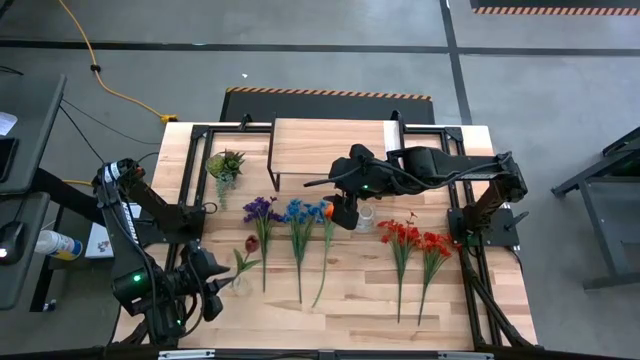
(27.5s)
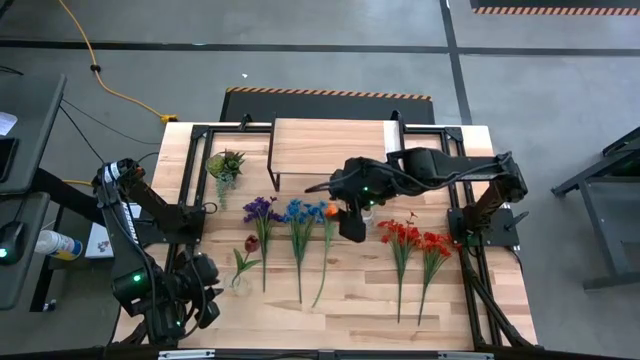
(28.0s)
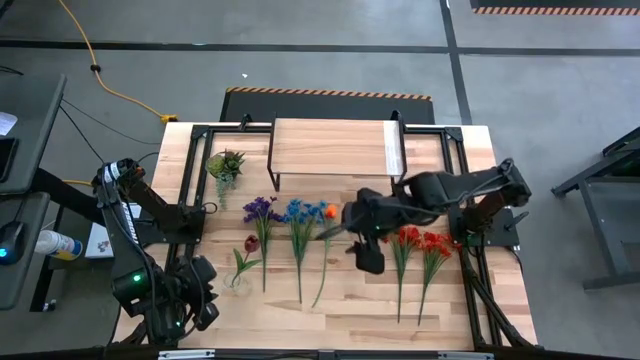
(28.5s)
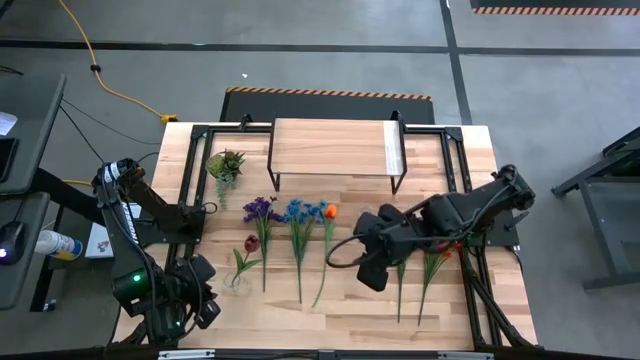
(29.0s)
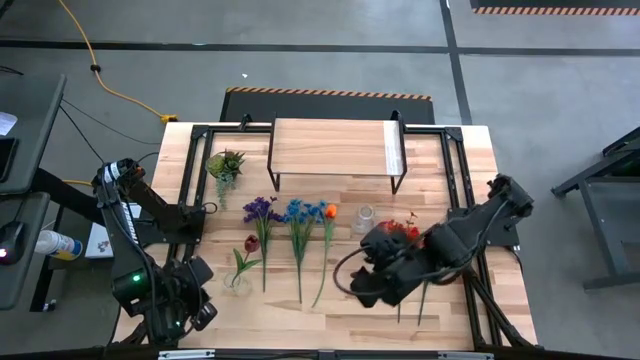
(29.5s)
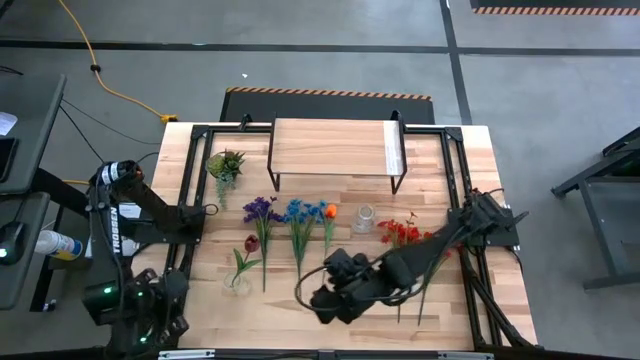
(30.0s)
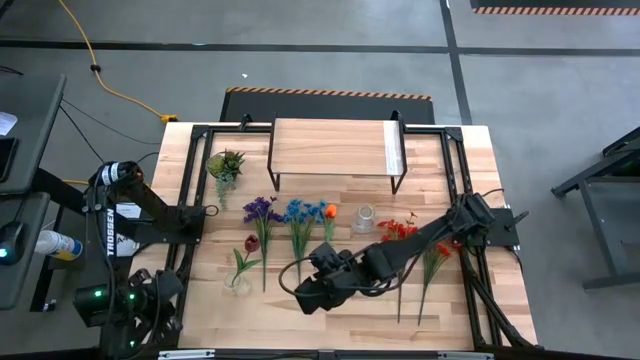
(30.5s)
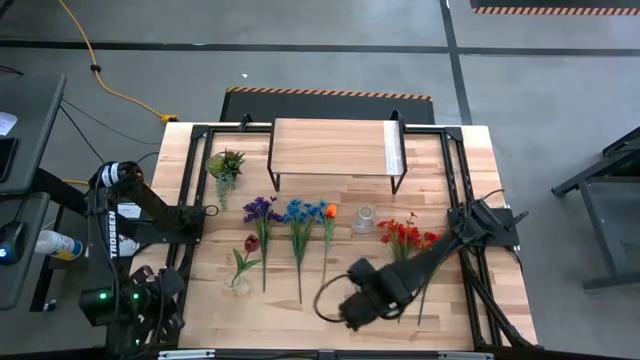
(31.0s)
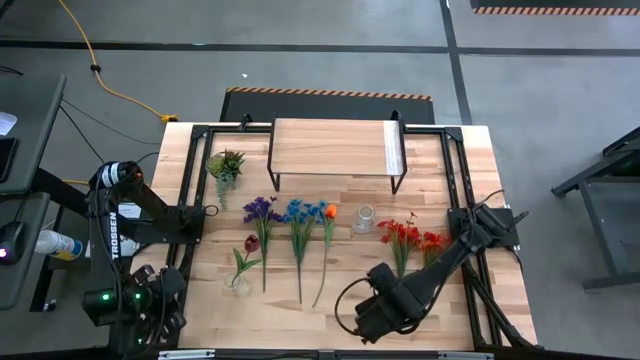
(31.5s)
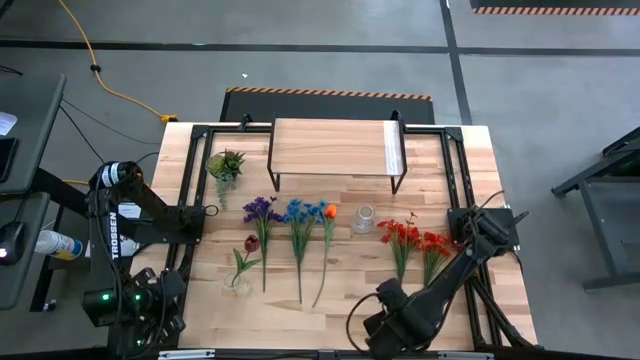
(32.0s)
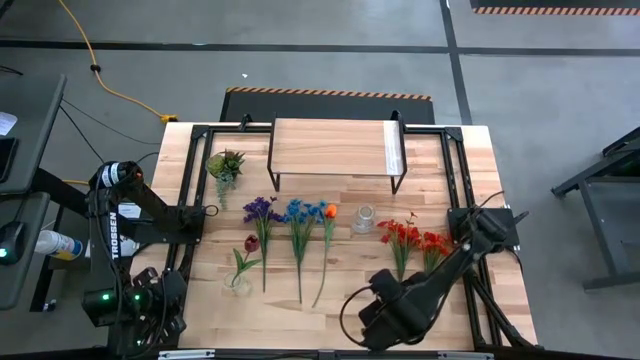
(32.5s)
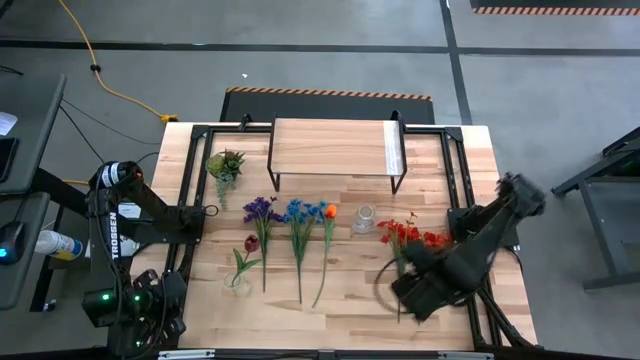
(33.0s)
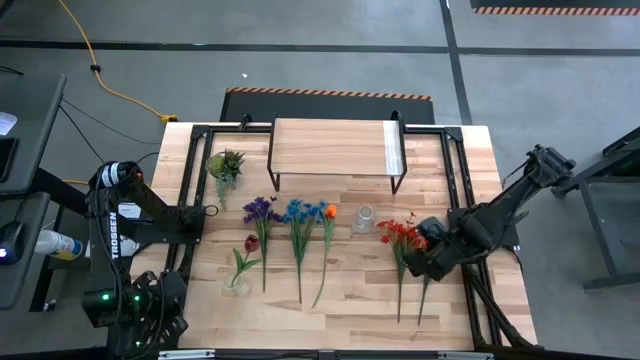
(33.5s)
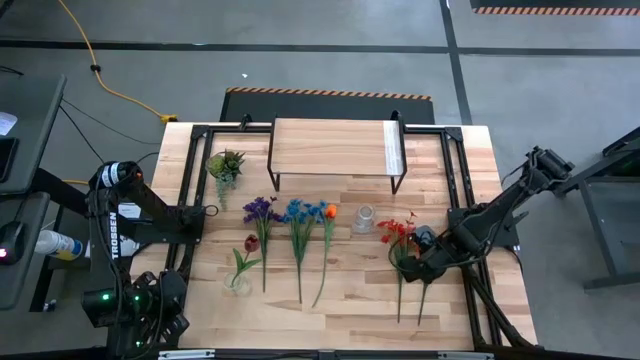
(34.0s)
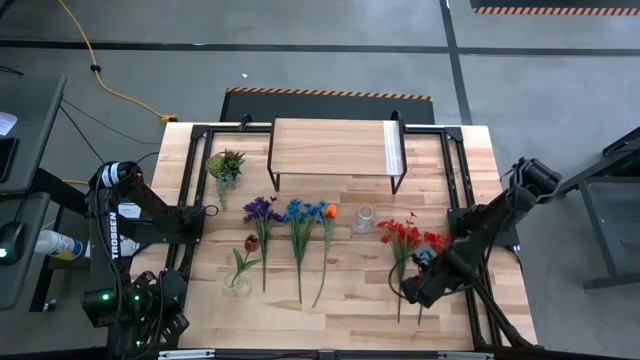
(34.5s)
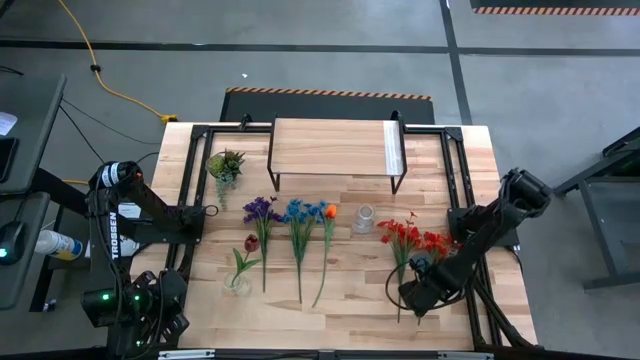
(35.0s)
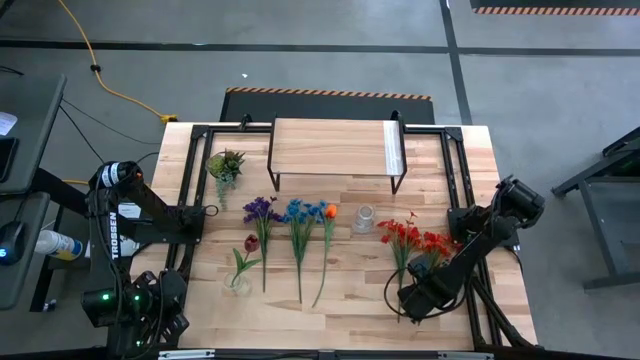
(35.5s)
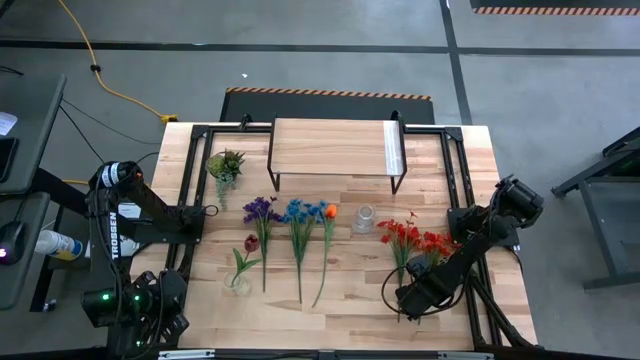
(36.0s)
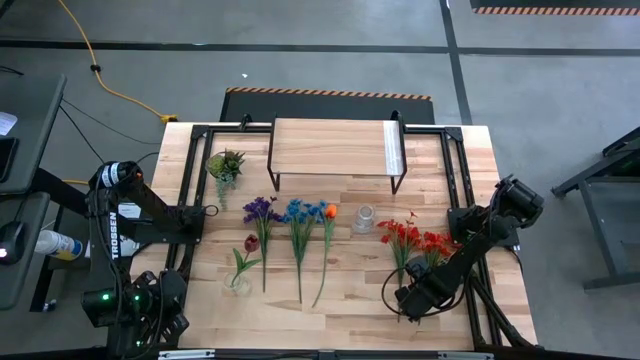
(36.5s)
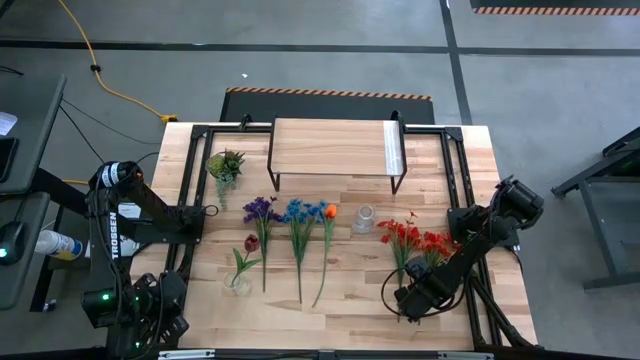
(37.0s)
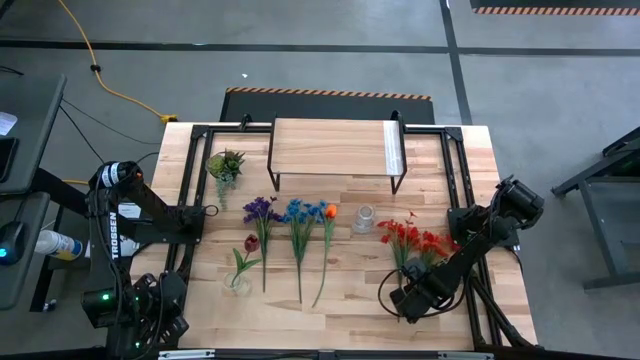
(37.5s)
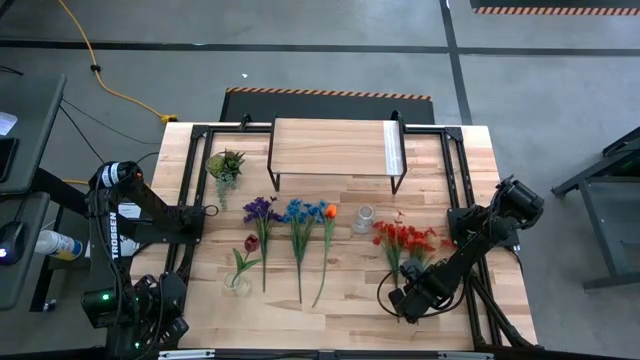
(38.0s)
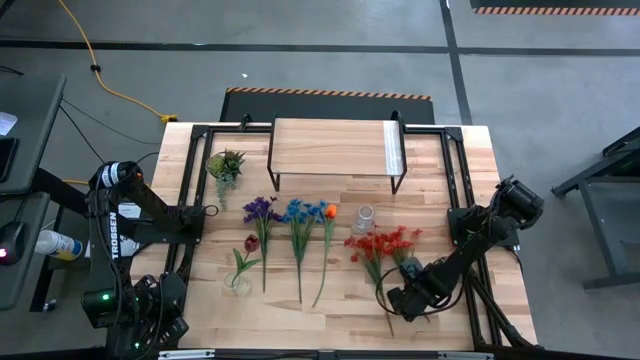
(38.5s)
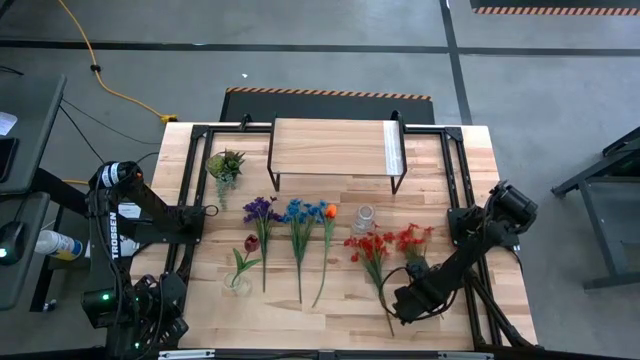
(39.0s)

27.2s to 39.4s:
Task: Pick and place flowers into a vace then onto a shelf
Put the right orange flowers into the bottom transparent vase

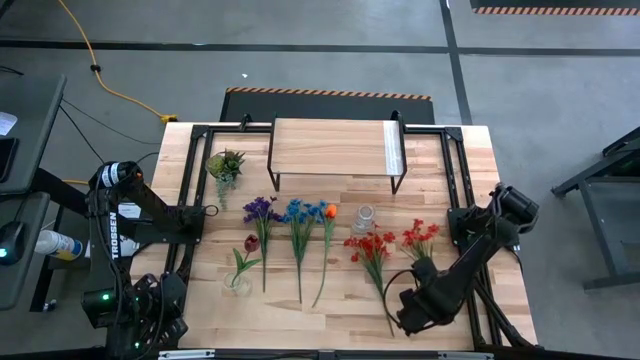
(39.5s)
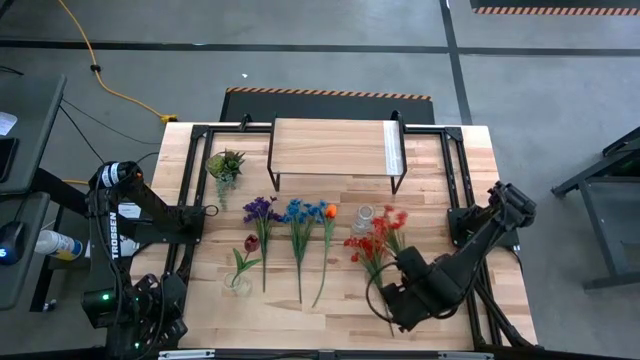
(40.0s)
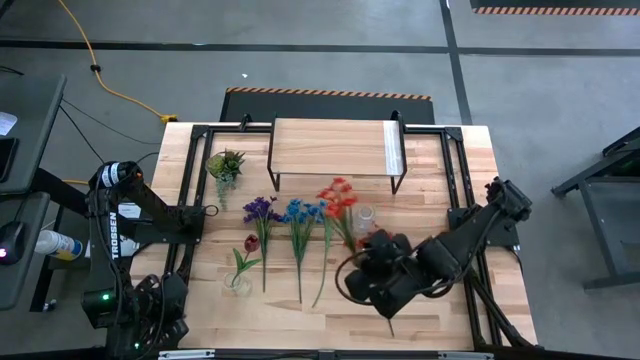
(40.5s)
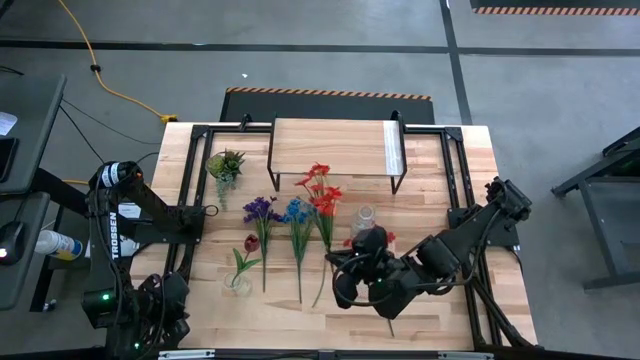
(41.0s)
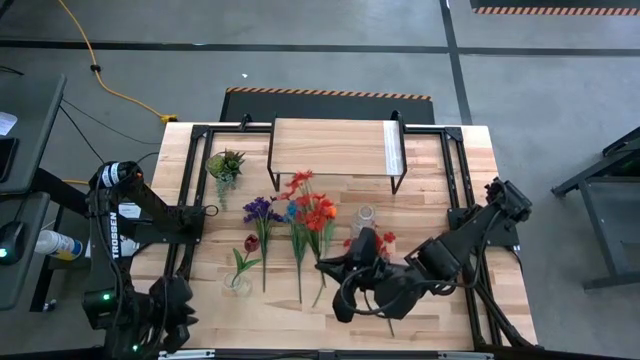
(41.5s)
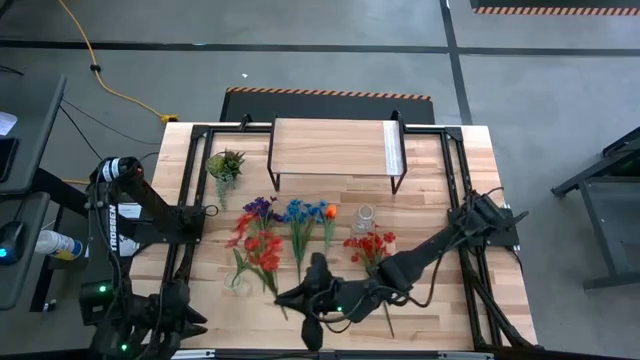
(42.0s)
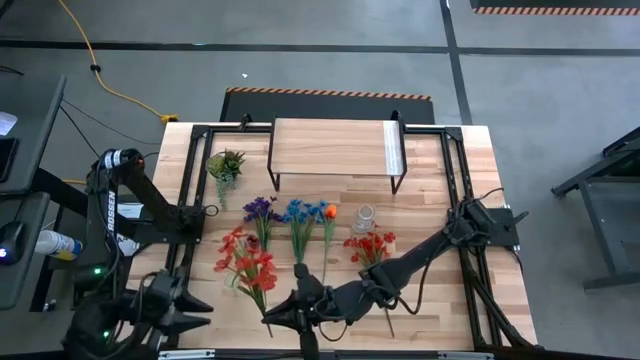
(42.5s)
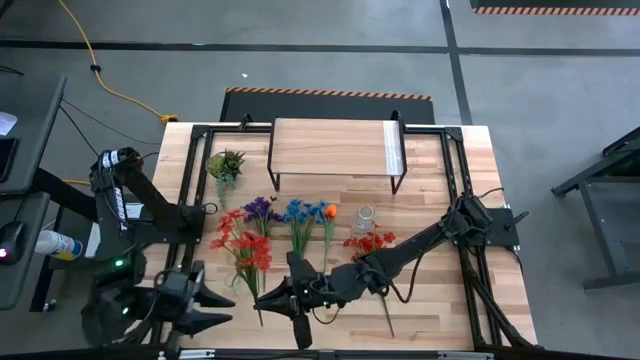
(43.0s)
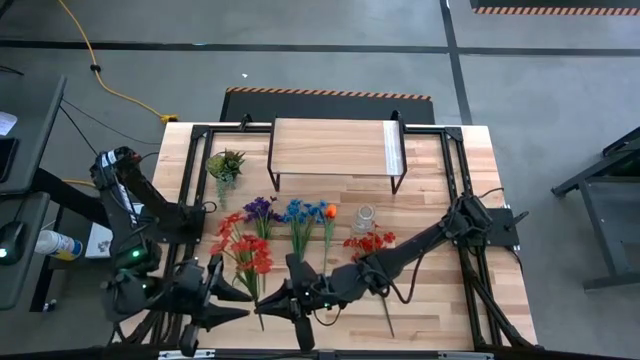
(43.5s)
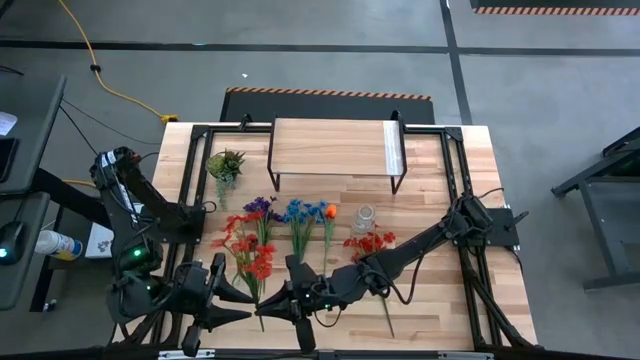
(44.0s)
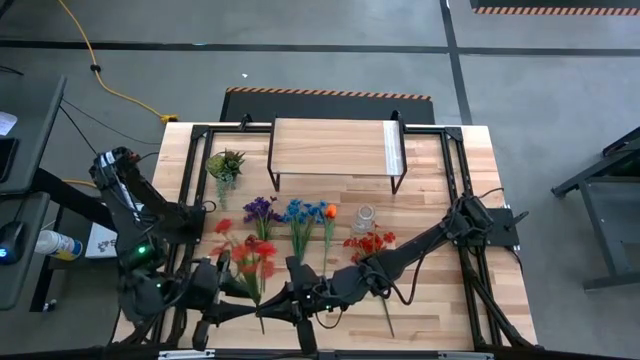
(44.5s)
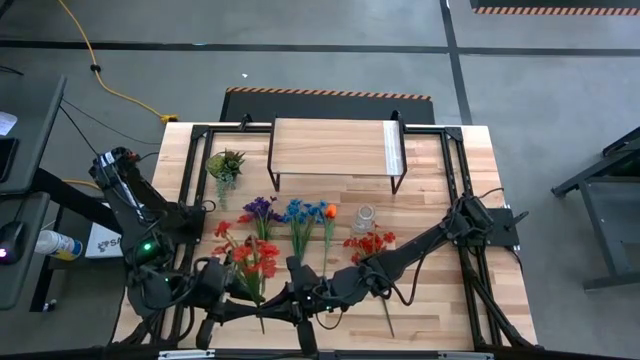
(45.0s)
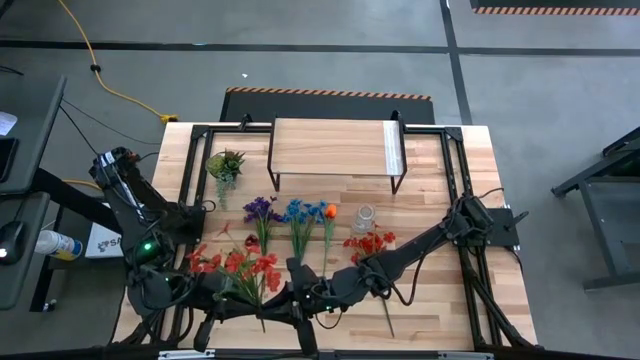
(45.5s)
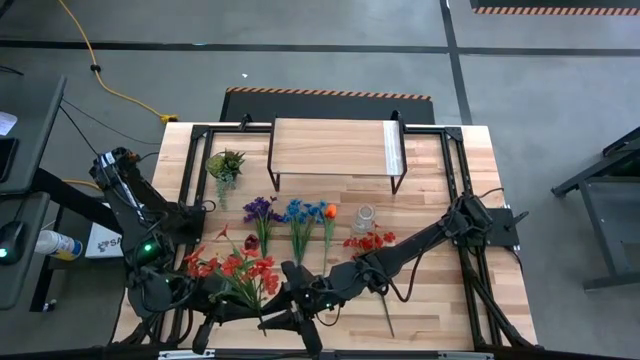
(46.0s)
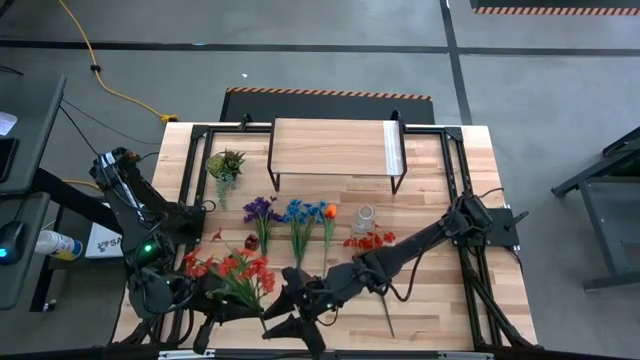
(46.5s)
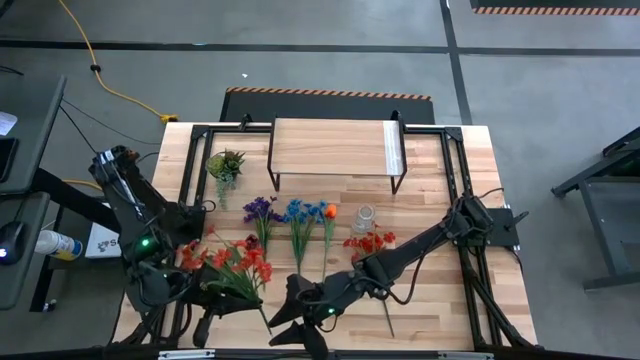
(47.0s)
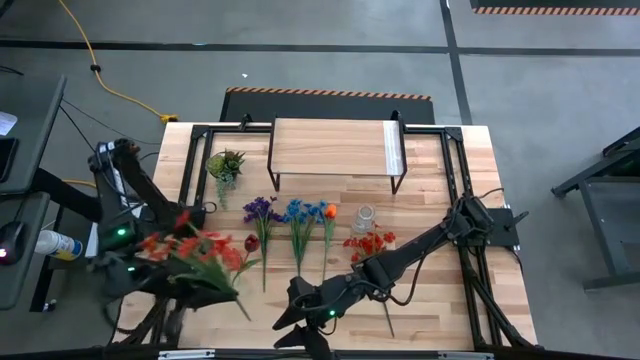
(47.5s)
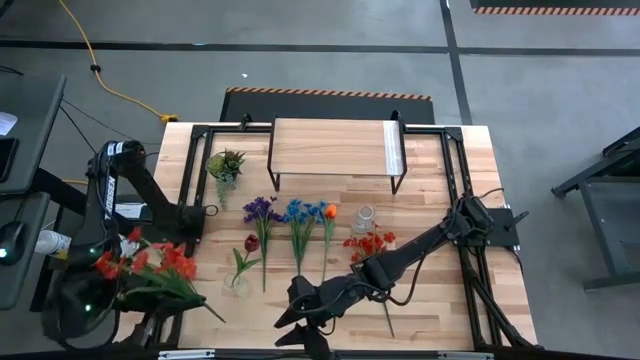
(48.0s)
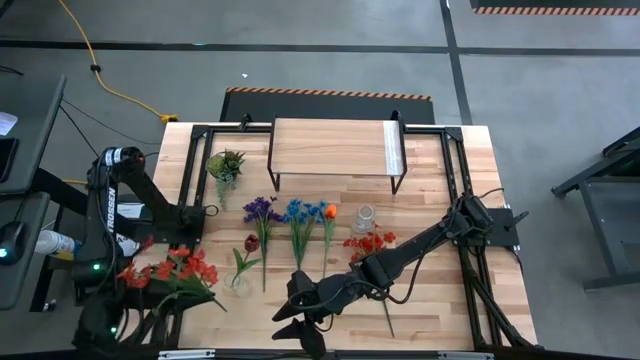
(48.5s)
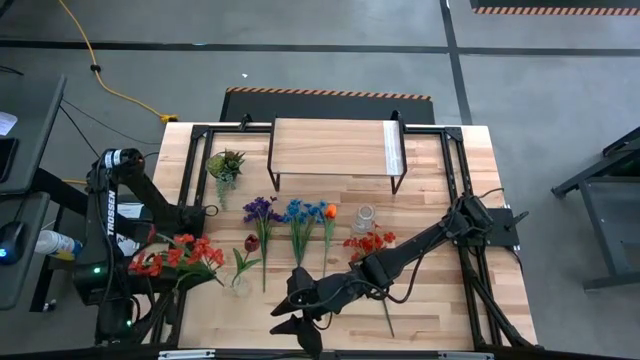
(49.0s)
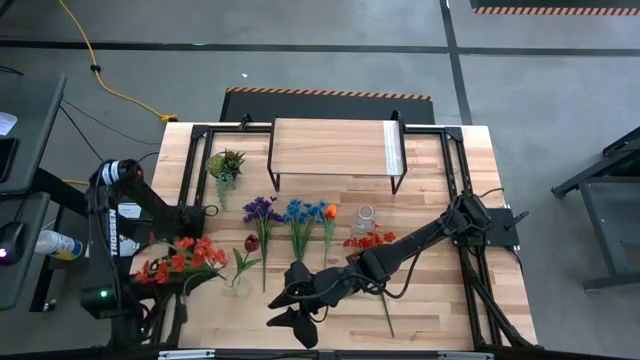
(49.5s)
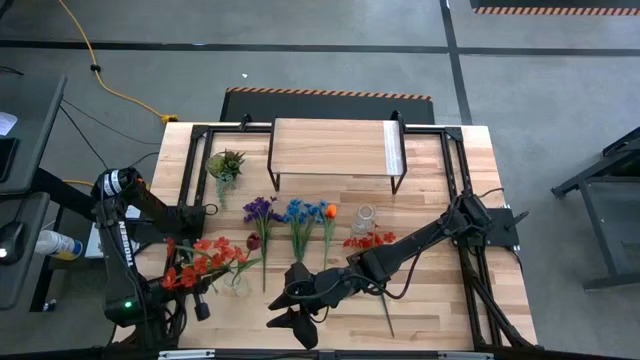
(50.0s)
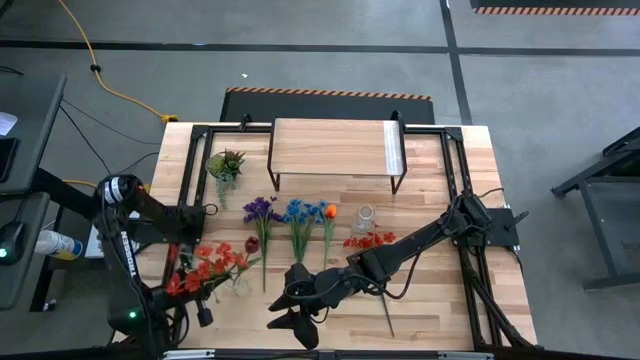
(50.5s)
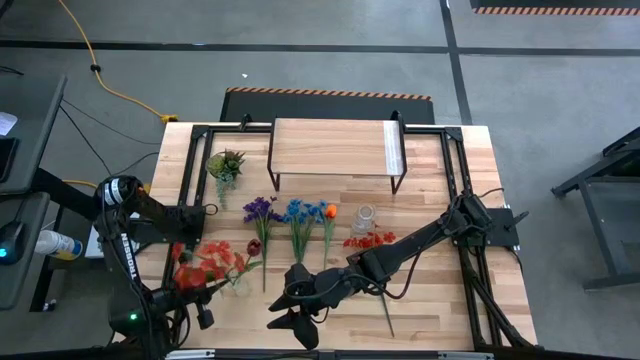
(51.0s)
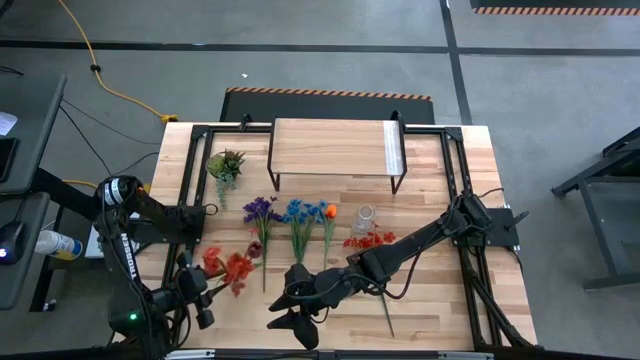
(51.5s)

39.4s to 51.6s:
Put the right orange flowers into the bottom transparent vase
